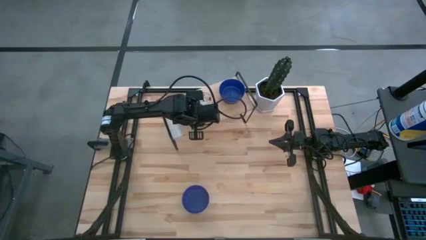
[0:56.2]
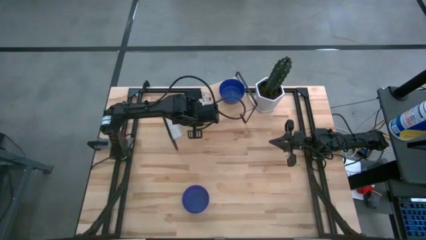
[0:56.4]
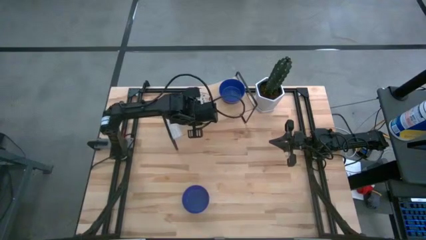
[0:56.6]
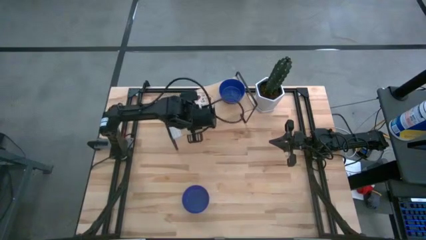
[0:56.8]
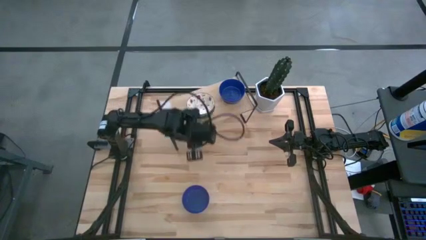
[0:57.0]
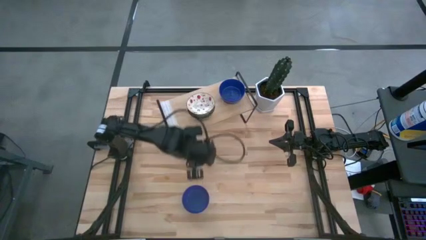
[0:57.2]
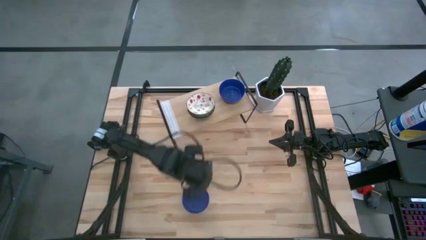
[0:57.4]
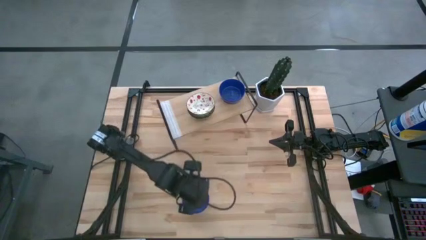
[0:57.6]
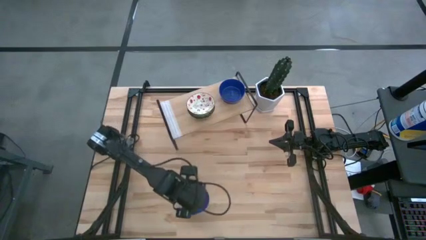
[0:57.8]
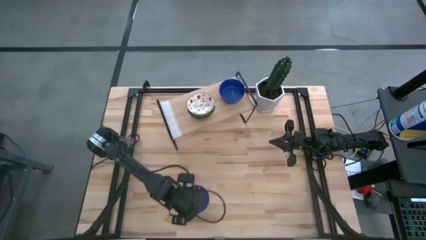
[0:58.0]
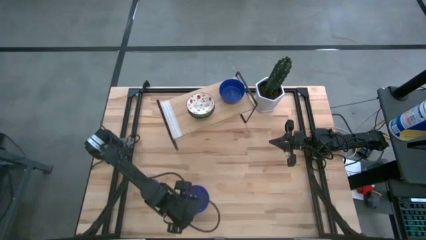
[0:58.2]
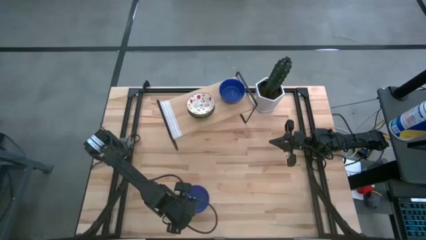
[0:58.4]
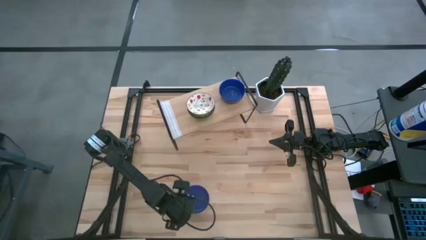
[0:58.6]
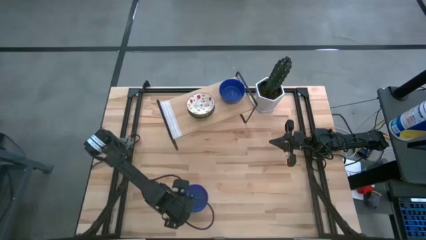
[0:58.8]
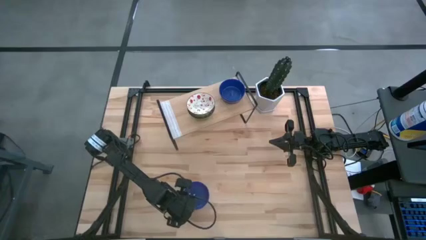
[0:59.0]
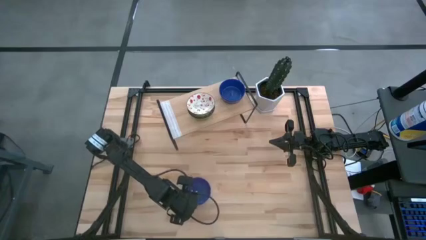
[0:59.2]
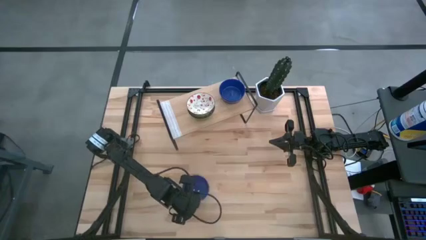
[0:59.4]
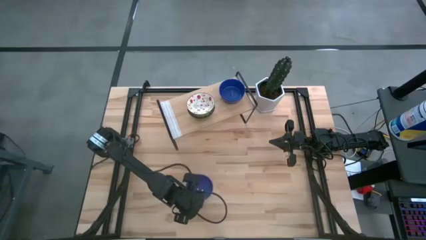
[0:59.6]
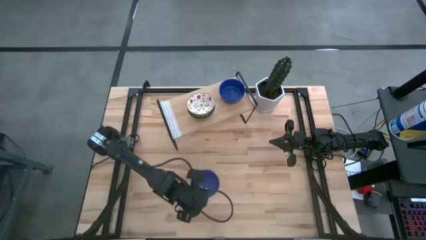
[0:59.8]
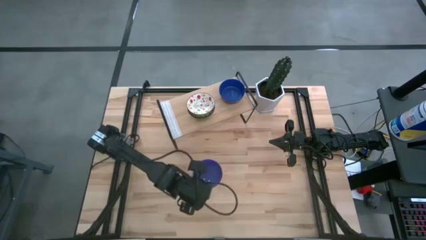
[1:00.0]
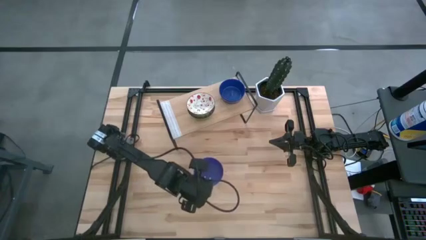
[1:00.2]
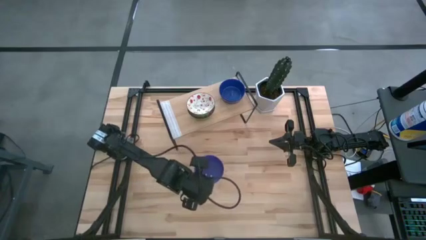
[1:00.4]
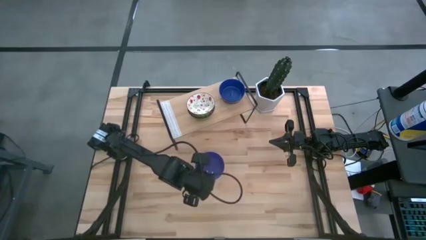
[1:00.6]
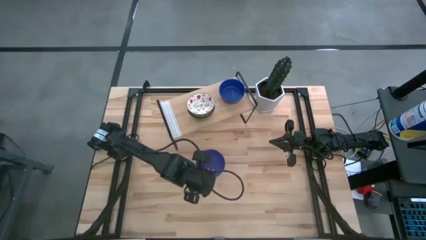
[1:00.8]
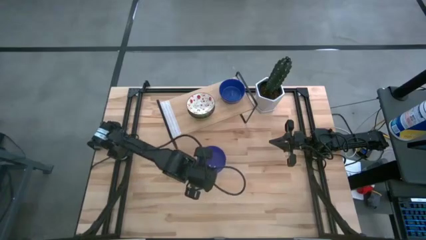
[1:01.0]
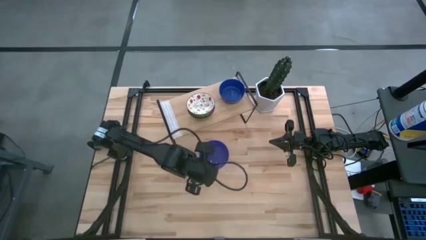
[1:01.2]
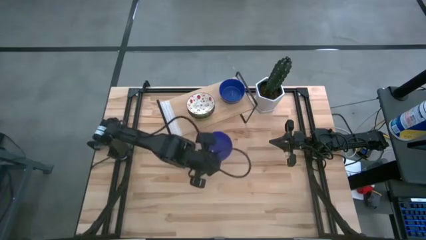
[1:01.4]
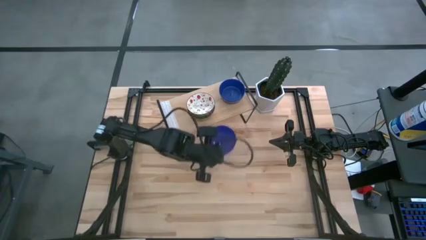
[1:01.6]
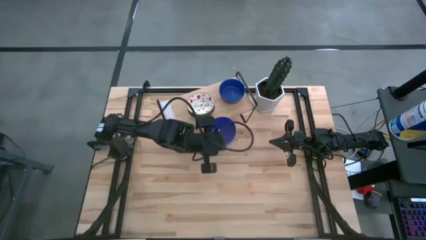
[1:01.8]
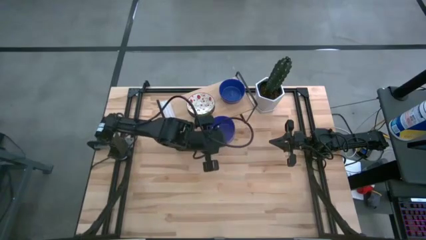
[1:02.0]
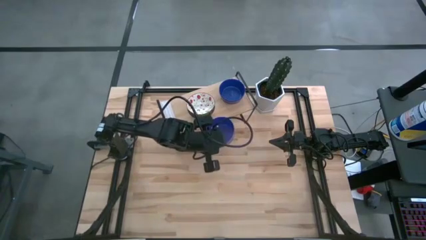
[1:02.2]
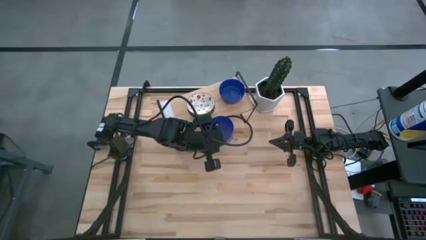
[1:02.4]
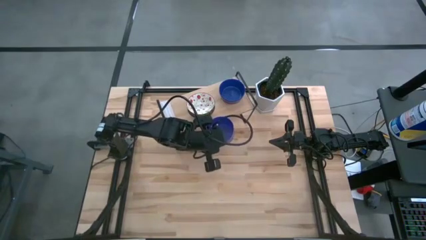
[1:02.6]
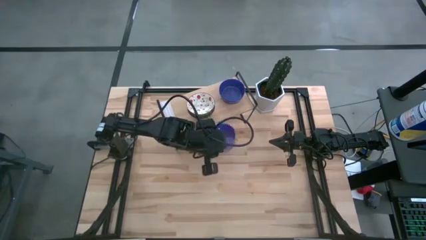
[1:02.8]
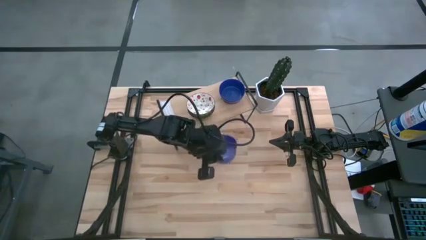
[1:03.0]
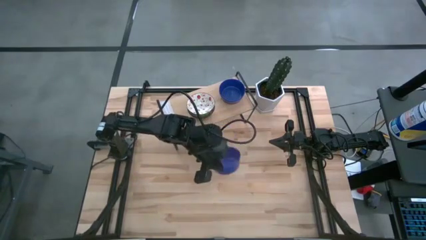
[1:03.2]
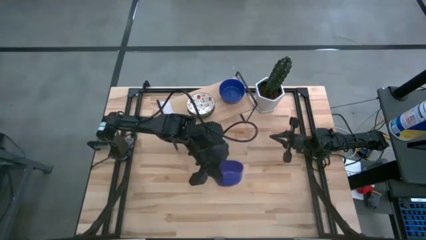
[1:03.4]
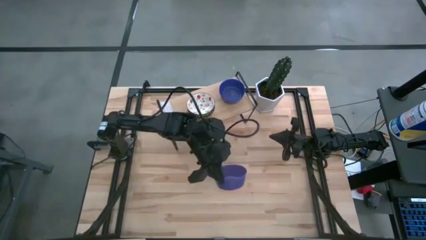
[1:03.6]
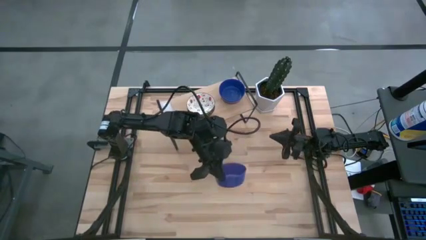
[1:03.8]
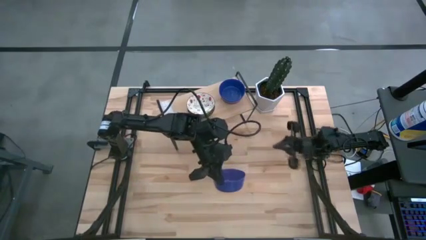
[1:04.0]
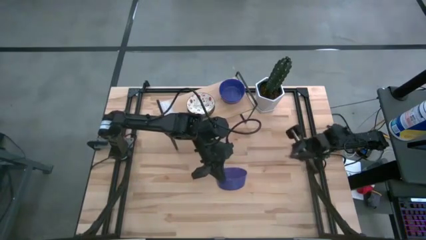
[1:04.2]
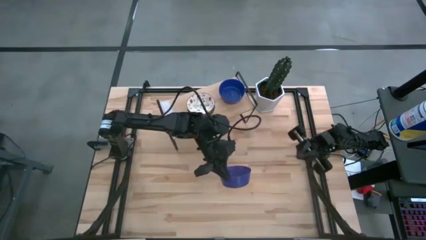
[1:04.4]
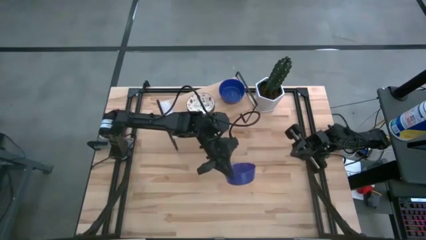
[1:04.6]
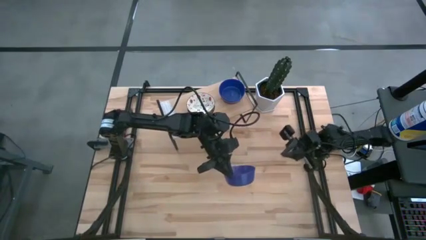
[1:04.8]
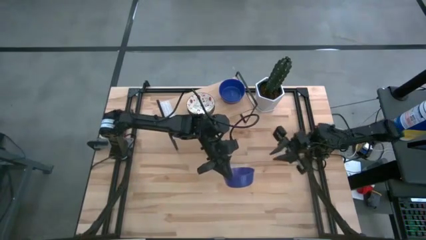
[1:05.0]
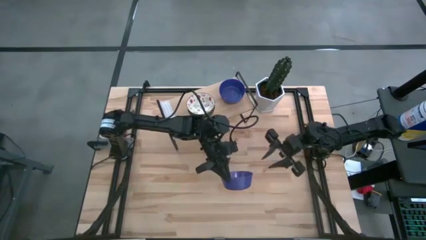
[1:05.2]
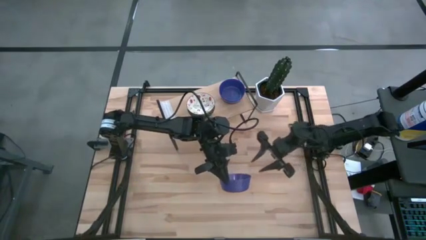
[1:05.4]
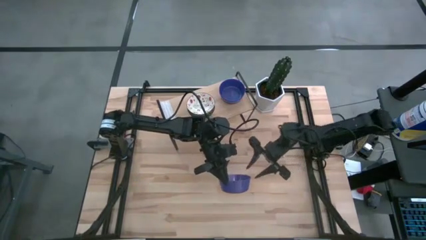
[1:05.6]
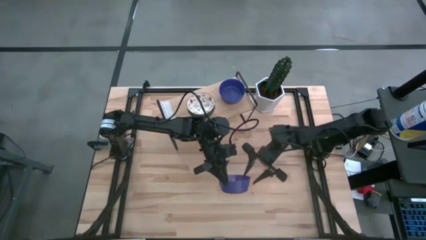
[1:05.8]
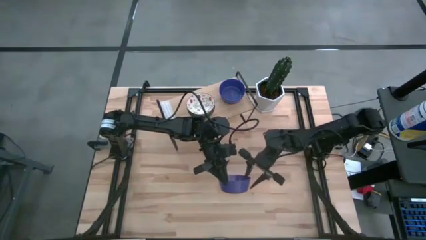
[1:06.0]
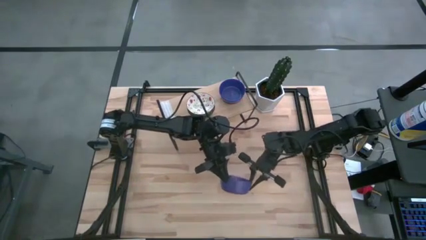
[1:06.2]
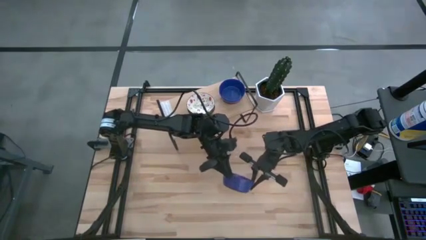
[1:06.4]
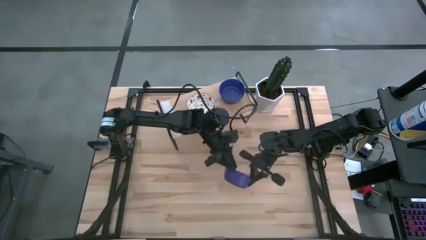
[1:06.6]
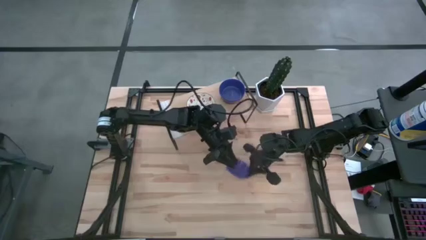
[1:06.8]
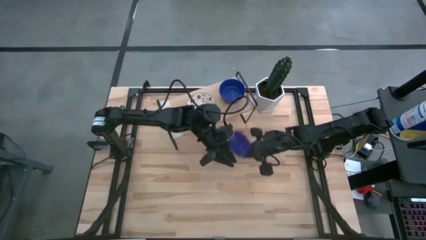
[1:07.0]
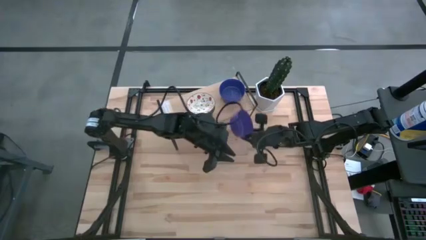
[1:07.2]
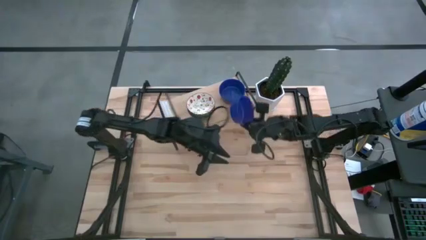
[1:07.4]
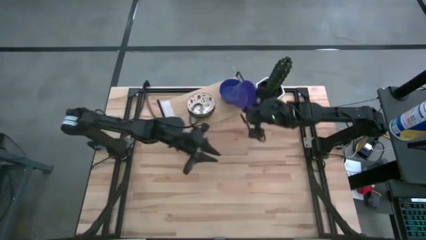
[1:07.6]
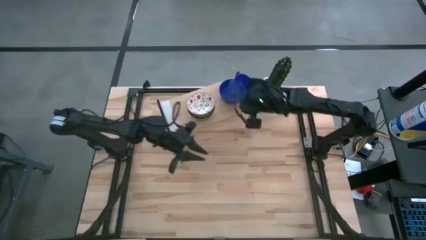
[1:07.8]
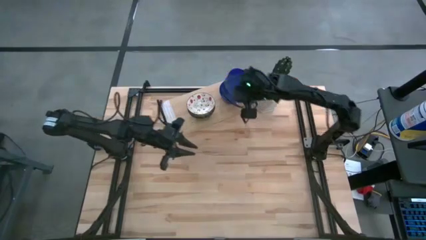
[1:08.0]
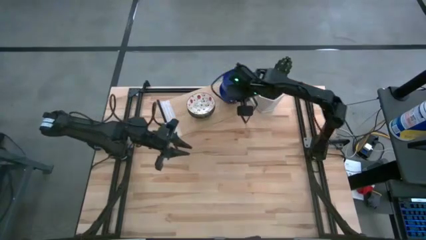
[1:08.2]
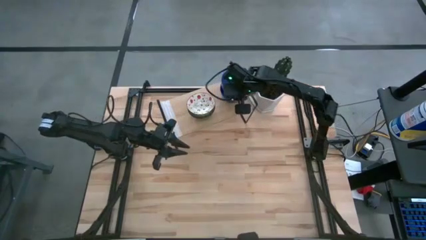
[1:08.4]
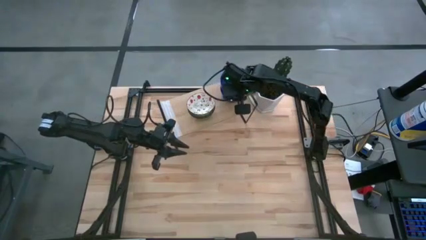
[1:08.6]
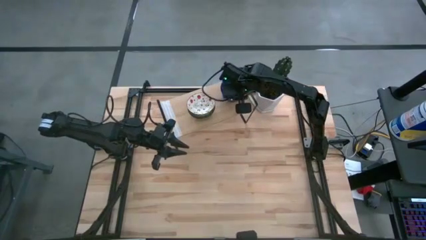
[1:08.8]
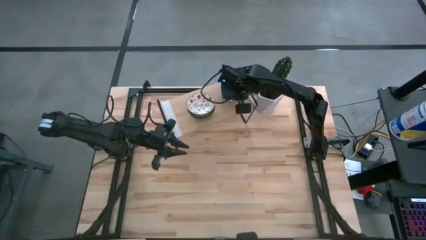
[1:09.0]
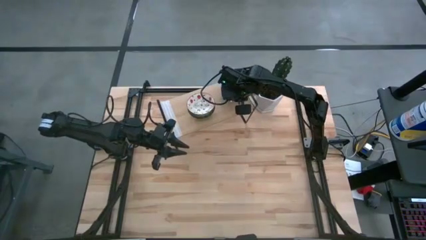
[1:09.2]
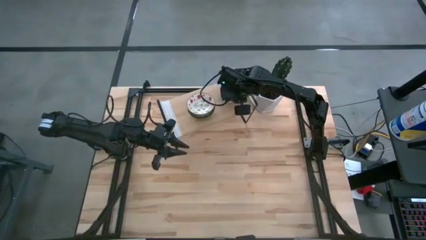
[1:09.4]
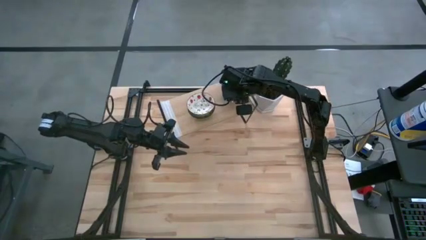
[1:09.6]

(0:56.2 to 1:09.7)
Task: Pick & Place Mini bowls
Stack the blue bowl on top of the blue bowls on the shelf

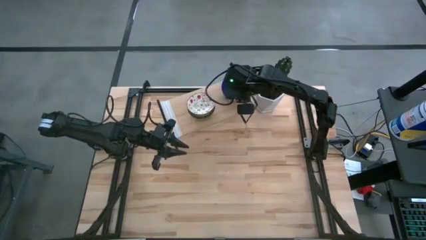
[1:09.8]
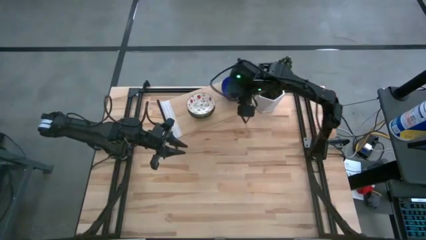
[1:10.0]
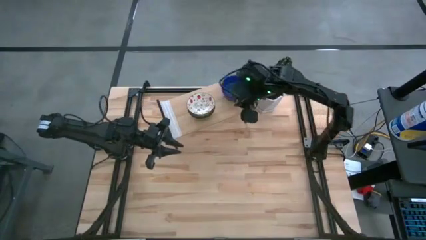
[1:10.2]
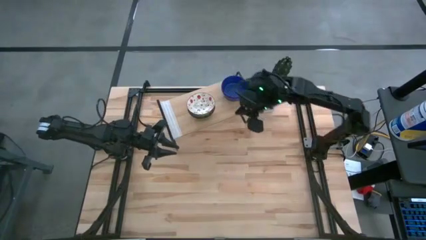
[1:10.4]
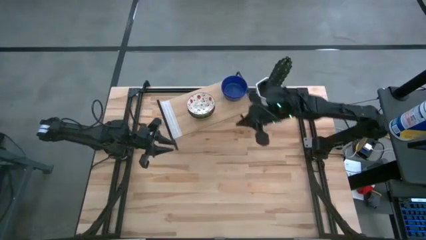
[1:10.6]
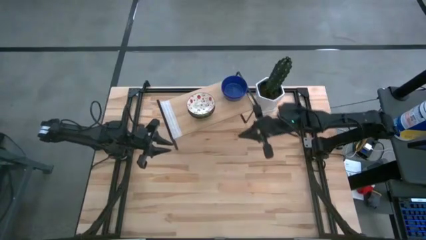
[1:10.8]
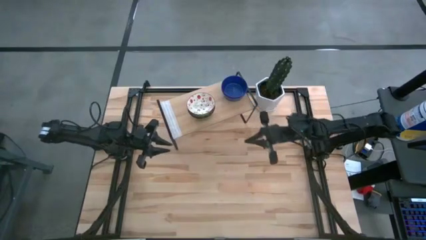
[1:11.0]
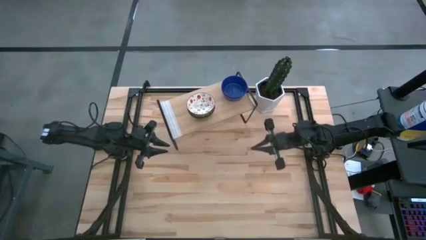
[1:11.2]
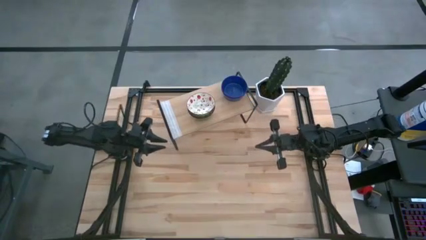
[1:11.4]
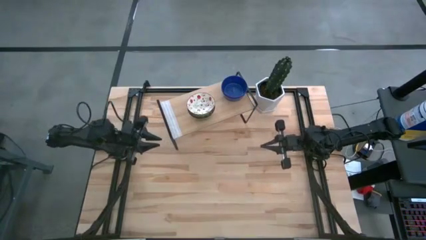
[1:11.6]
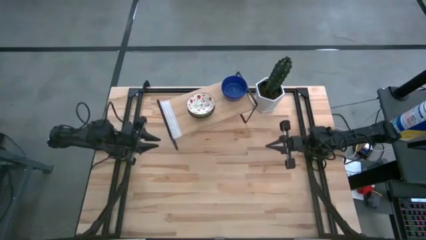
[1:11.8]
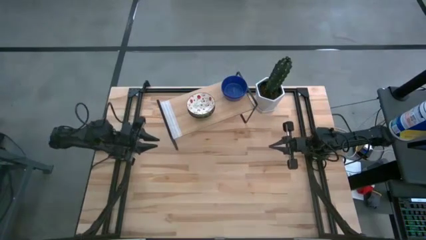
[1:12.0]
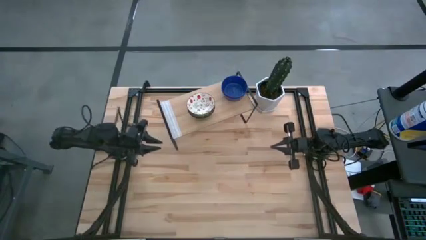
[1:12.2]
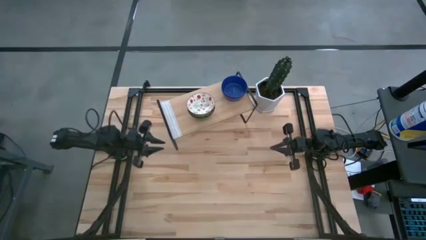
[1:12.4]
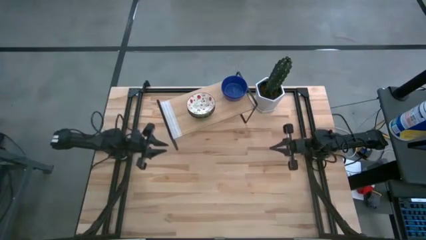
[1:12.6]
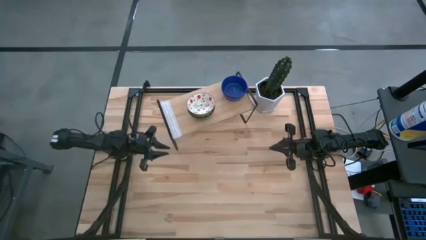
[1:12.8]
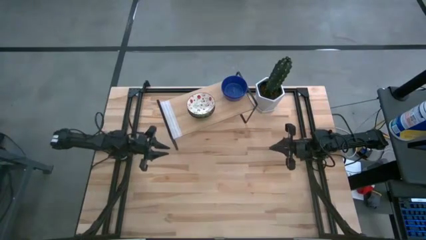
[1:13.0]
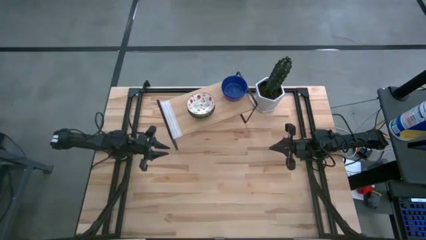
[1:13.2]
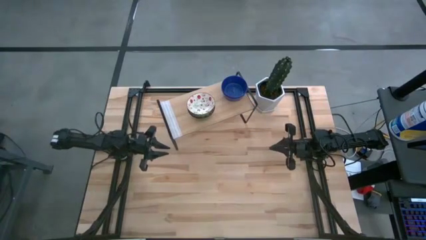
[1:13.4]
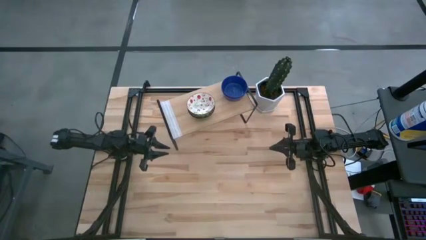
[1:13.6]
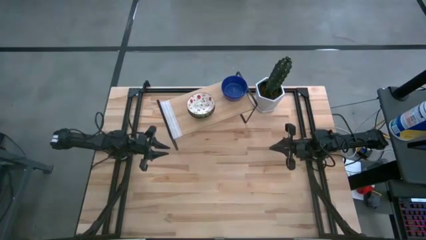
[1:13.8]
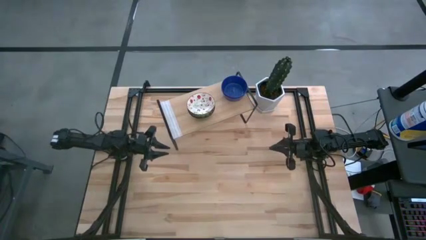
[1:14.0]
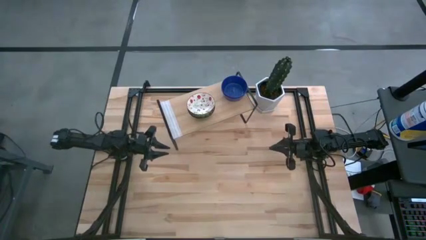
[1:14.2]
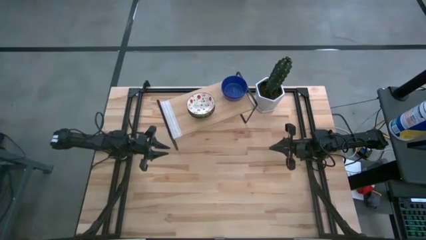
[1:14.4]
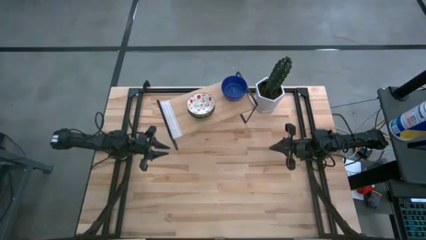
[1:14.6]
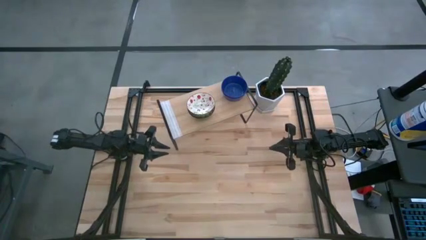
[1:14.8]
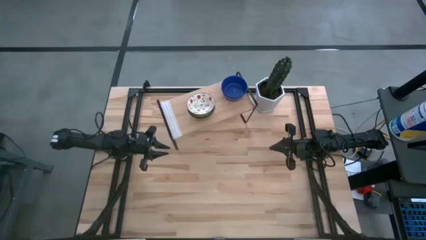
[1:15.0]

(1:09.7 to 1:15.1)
Return to Home Position
